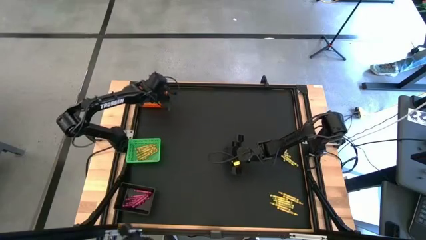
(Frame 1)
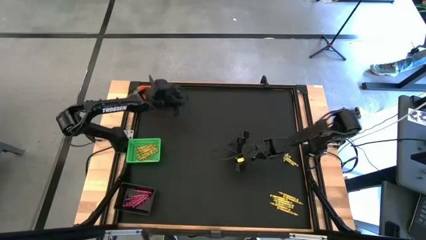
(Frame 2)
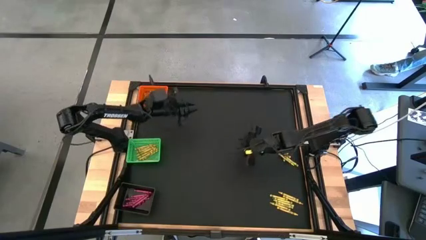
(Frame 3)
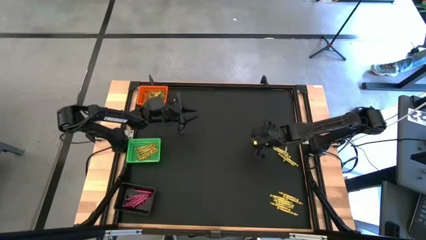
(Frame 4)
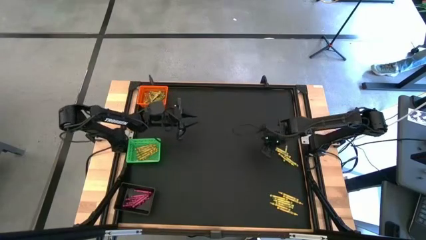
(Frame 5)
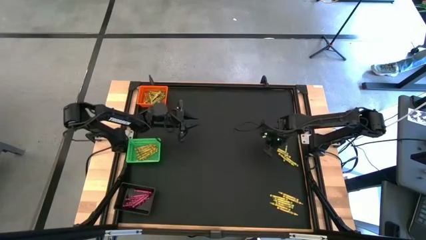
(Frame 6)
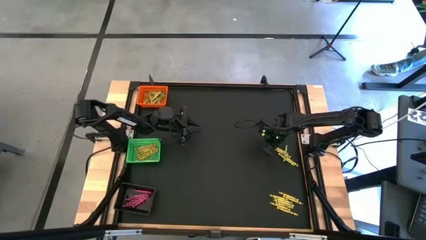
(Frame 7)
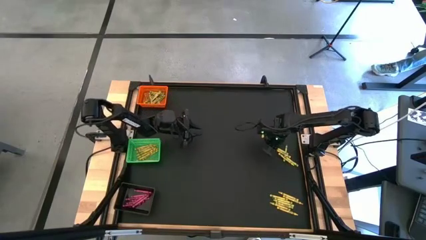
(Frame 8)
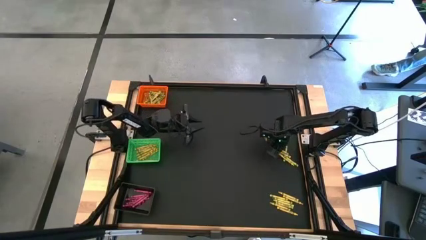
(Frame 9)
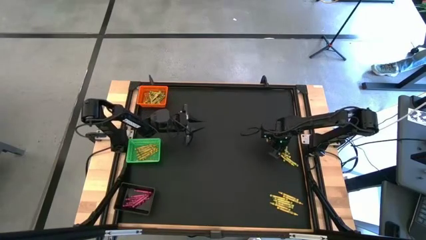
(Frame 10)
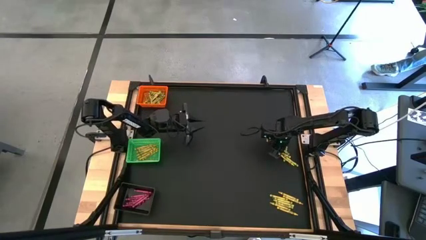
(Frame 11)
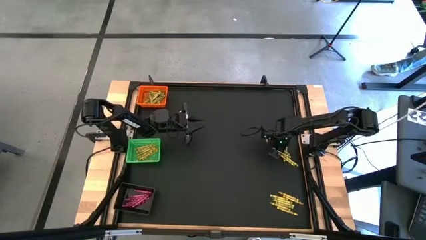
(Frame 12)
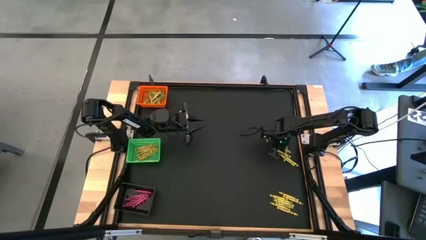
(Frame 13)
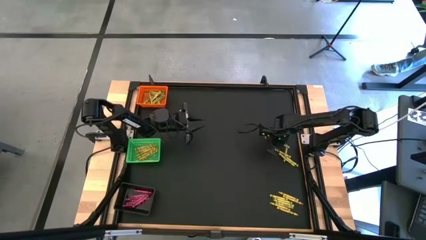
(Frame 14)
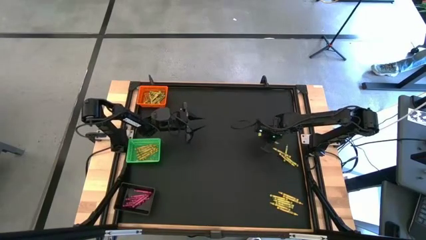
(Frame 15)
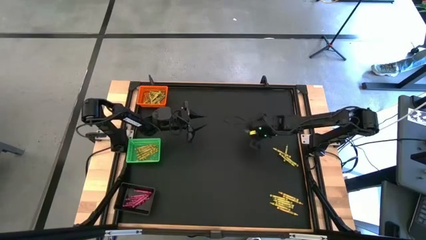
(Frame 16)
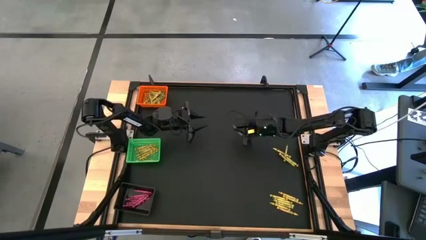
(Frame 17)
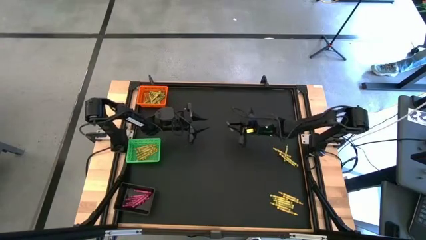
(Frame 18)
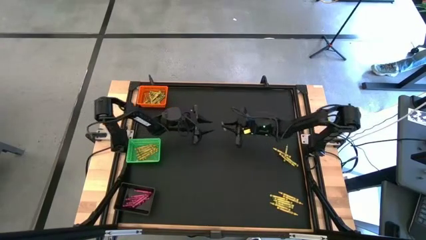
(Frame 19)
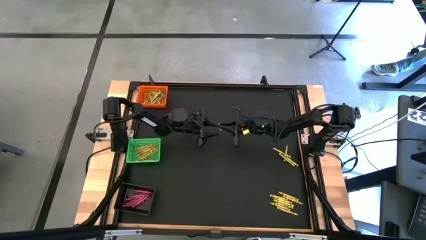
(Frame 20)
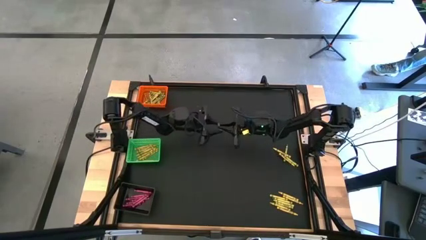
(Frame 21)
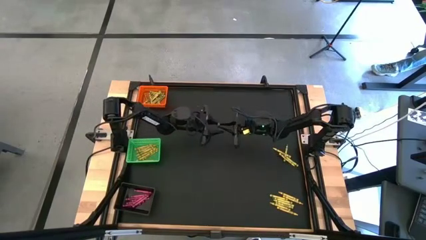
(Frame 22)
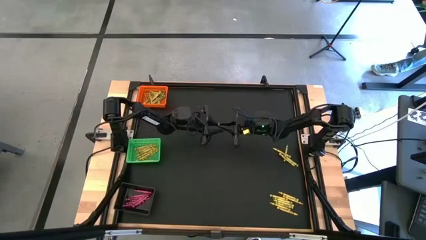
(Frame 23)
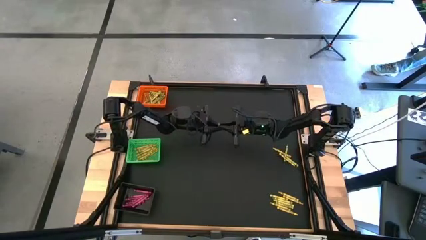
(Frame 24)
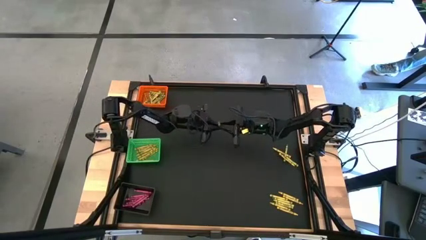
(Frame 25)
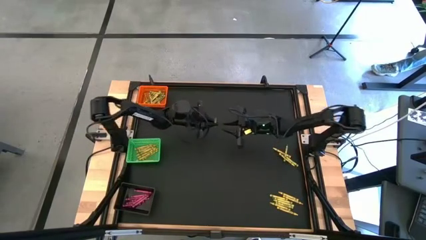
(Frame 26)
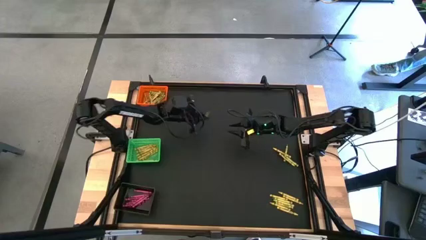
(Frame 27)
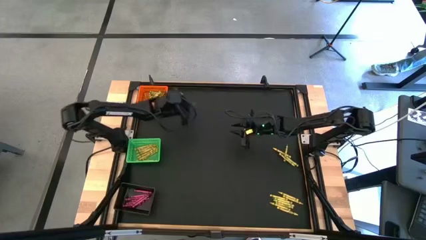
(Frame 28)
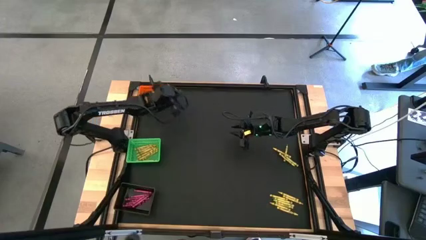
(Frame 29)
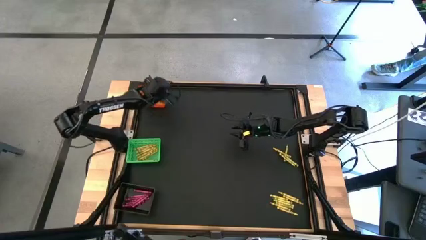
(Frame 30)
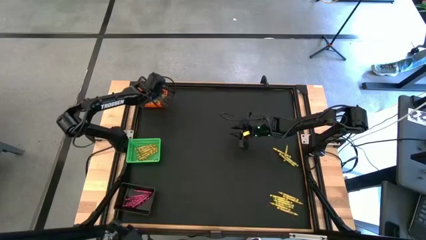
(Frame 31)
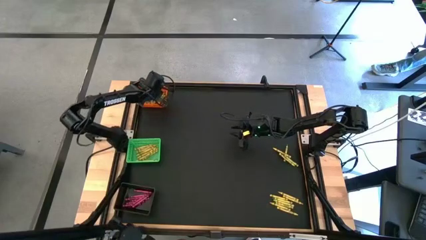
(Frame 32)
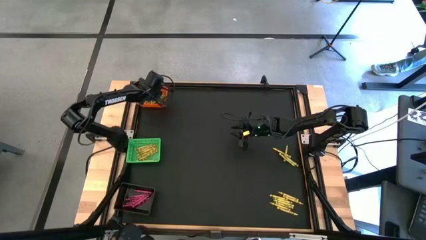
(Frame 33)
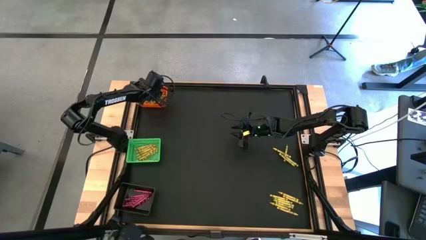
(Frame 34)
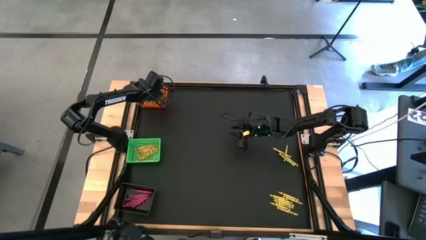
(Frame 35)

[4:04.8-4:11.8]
Task: Sort crayons
Put the green crayon into the orange bin

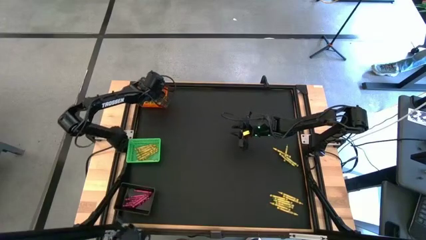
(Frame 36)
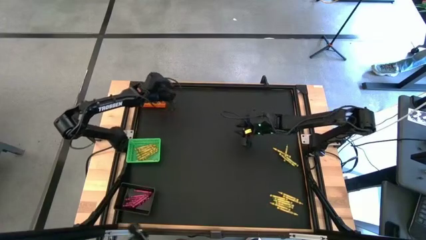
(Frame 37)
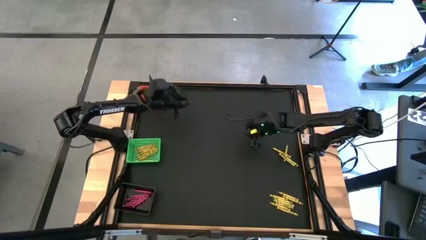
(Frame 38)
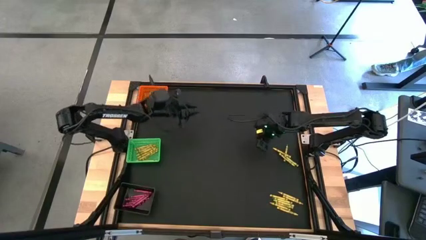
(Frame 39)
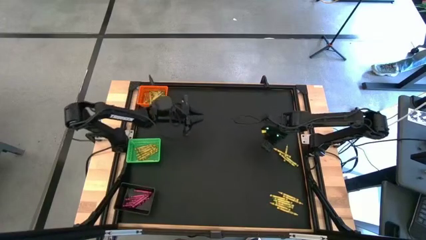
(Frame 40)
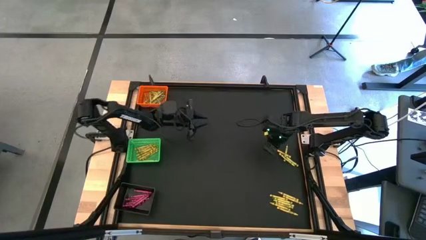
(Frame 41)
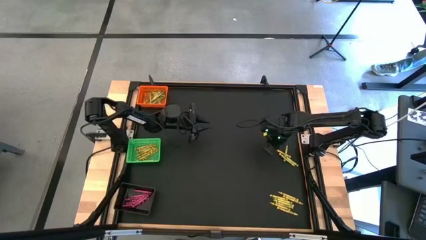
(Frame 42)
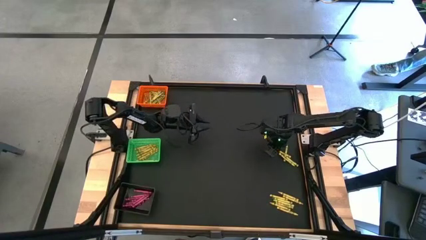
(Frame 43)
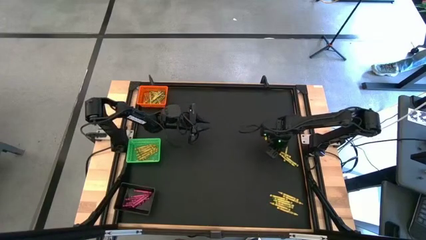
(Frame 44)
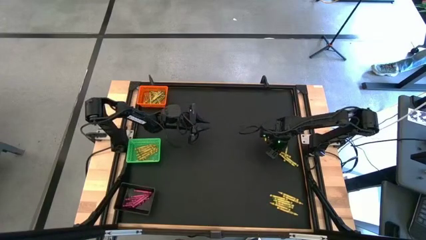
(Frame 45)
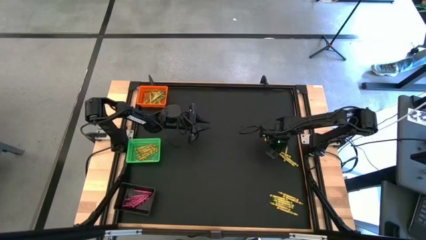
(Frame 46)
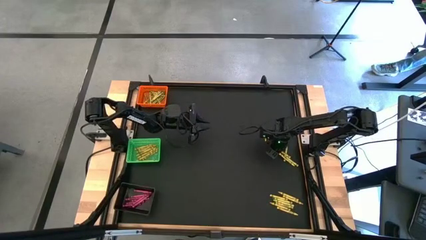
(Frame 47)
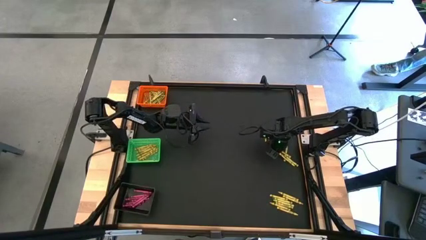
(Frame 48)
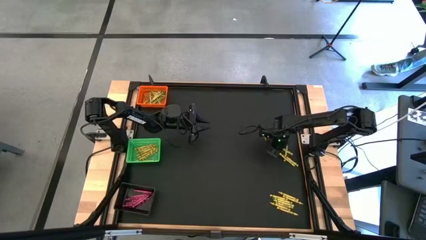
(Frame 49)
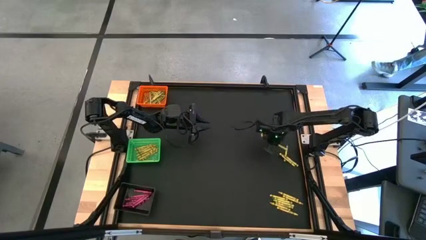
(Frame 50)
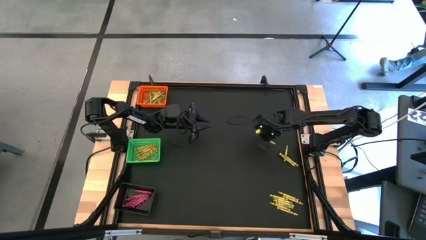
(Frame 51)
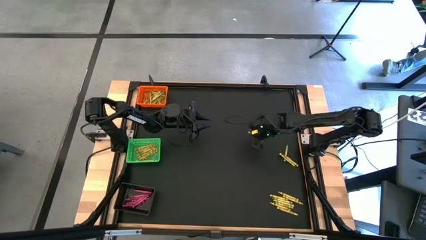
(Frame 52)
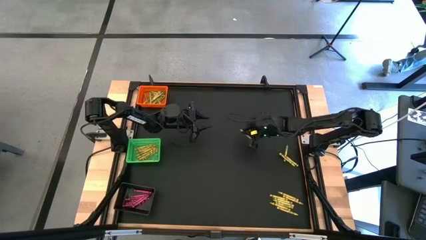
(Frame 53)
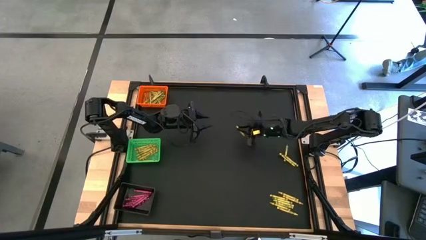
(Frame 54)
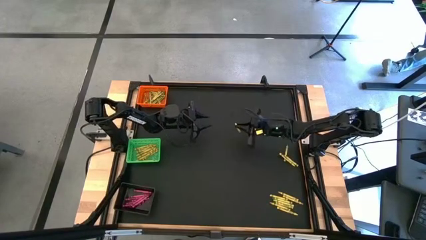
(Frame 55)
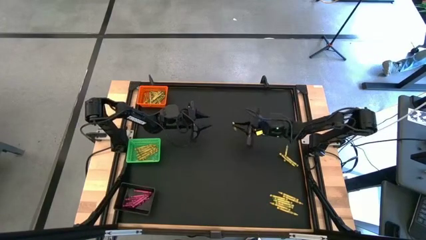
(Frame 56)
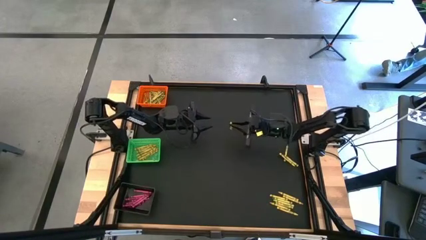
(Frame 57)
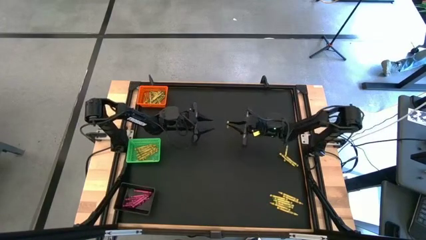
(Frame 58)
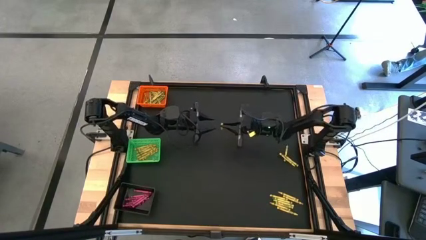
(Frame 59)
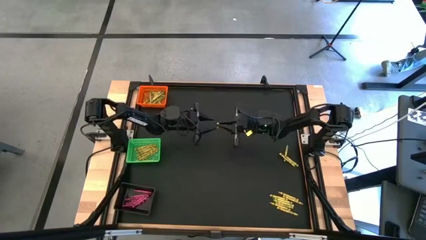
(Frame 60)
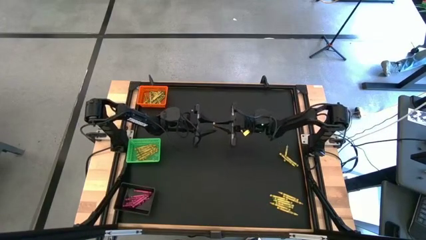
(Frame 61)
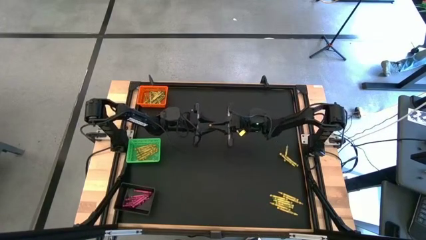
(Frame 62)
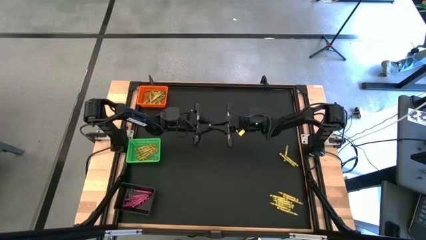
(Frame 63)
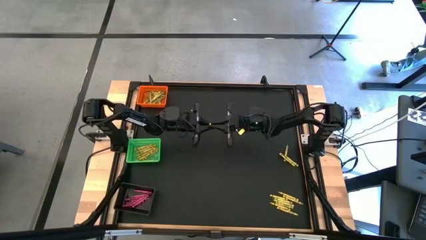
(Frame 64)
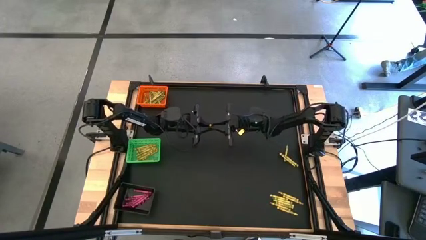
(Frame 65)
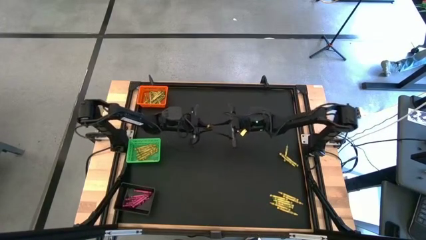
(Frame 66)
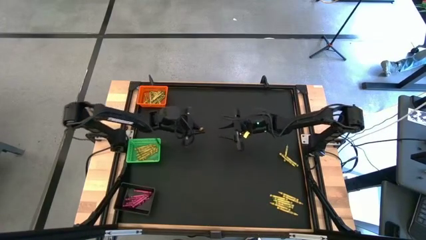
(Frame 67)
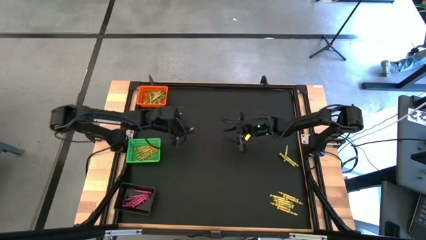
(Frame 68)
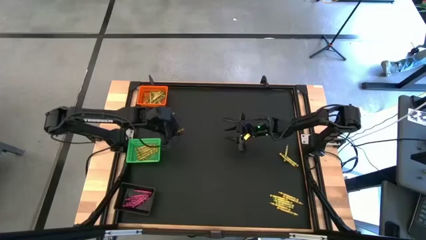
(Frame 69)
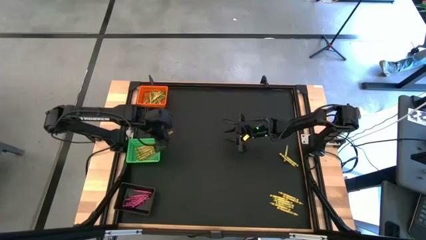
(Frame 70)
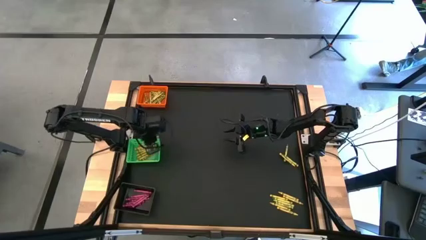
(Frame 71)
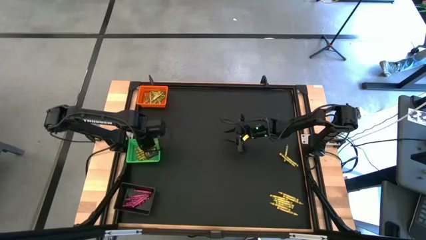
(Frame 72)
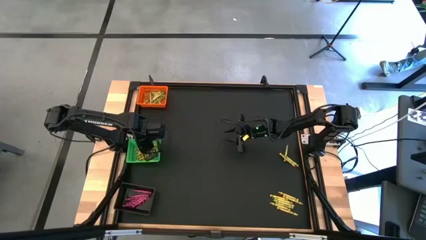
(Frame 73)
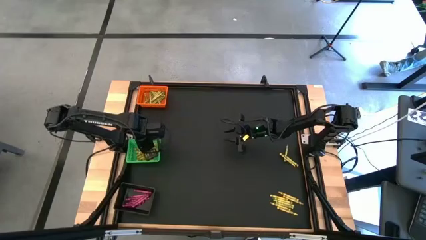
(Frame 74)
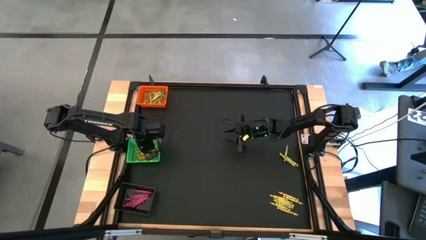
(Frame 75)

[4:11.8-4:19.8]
Put the yellow crayon into the green bin

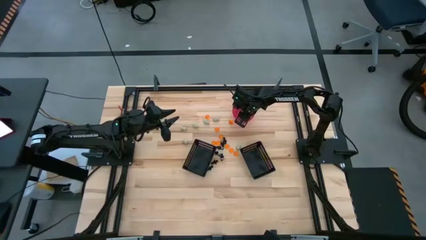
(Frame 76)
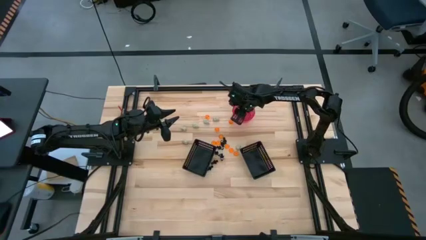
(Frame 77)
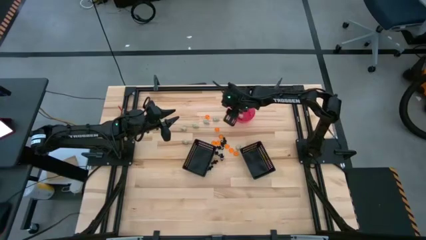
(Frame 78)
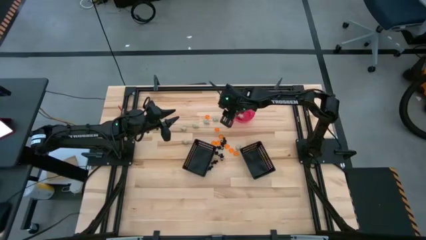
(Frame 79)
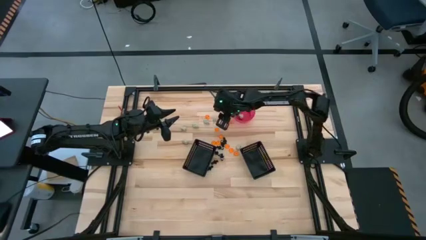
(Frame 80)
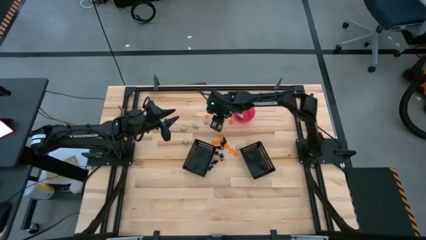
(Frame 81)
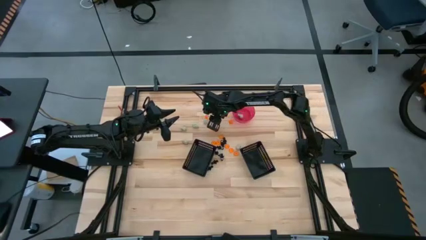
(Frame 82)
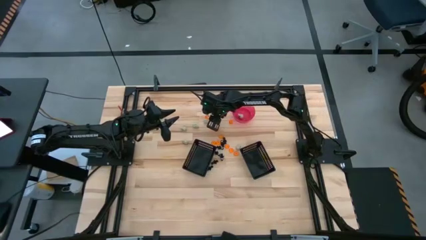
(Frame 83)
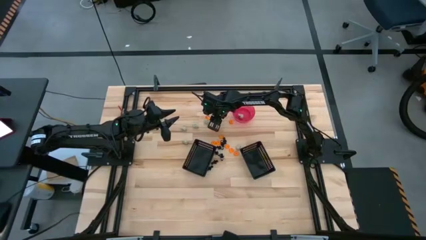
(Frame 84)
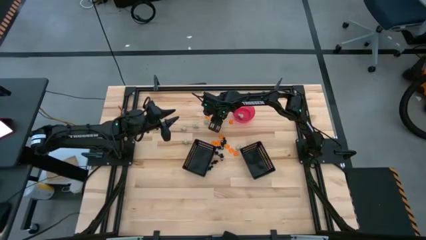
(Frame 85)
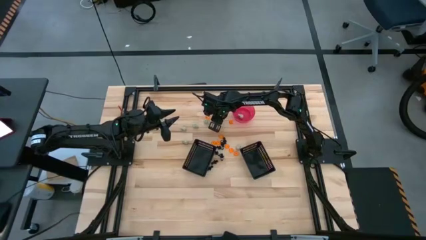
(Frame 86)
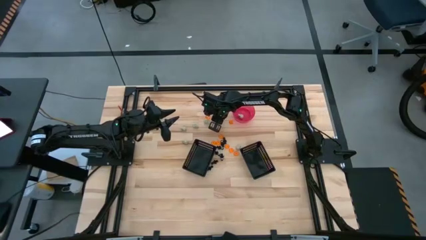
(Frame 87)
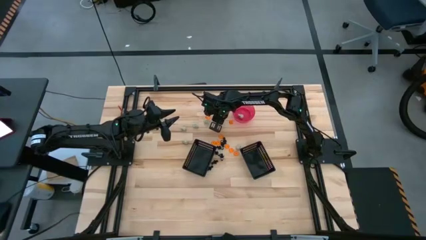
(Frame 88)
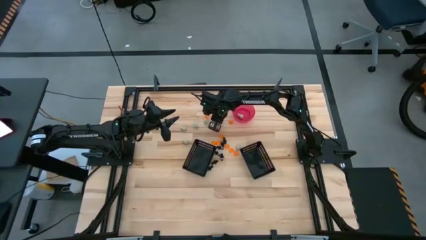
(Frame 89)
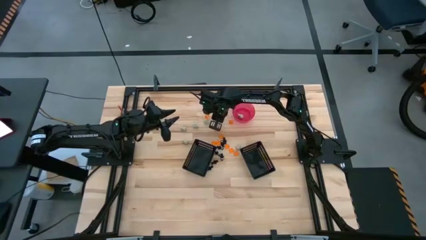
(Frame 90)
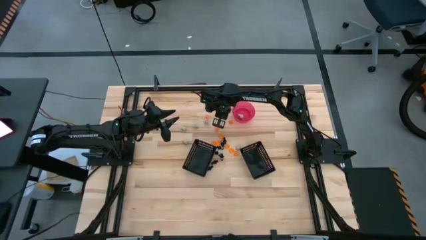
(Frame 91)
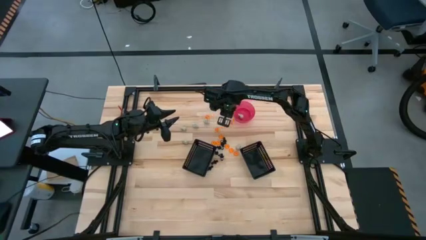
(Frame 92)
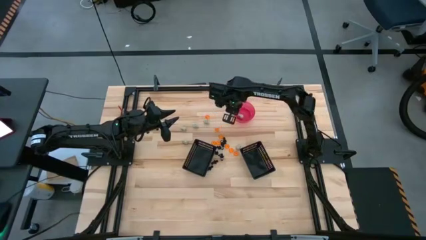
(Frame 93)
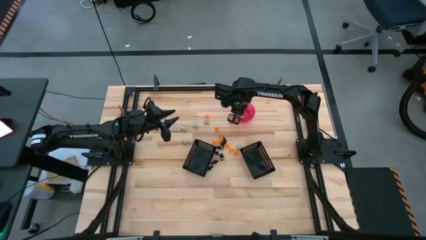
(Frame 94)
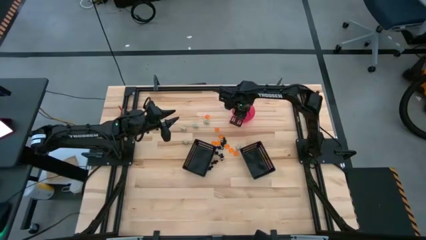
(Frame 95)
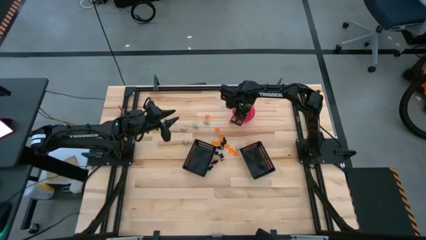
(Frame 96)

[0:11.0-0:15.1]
Task: Sort Halloween decoration
Put the white skull toy into the pink container
